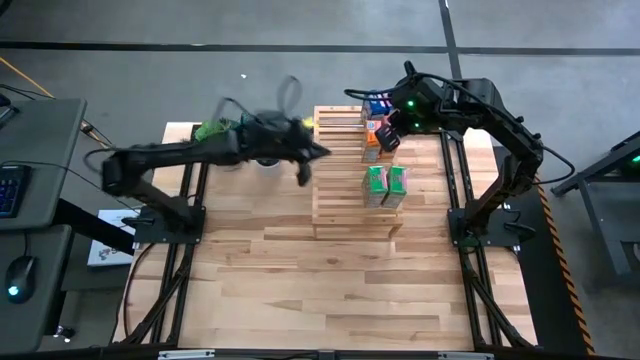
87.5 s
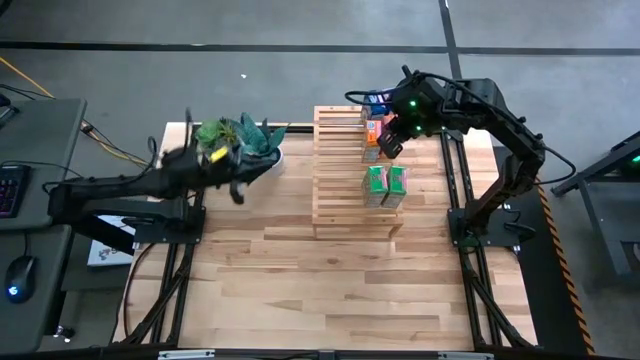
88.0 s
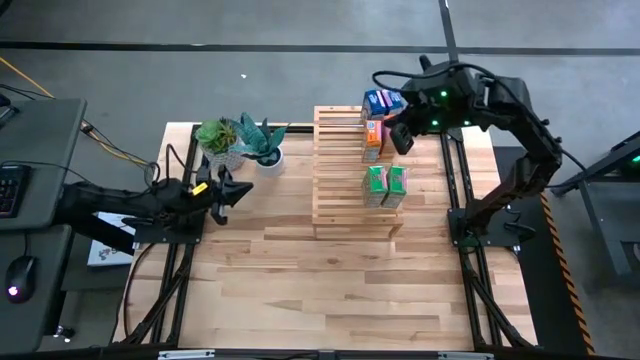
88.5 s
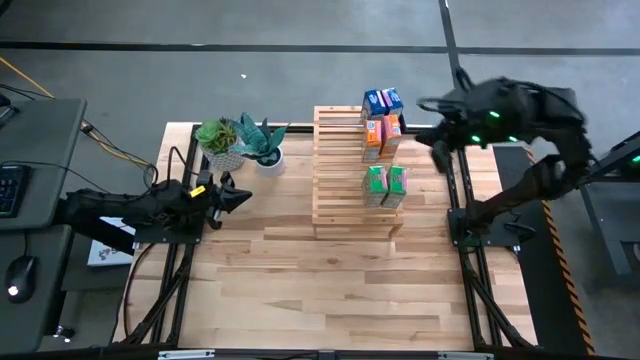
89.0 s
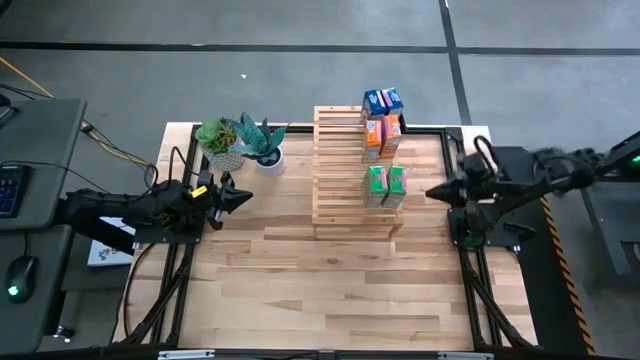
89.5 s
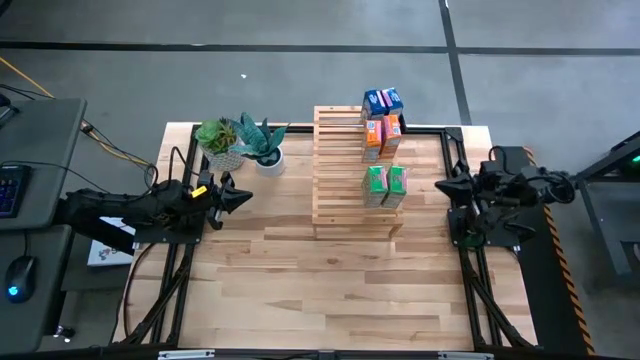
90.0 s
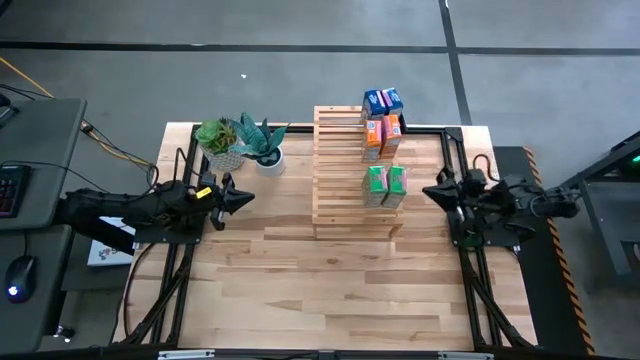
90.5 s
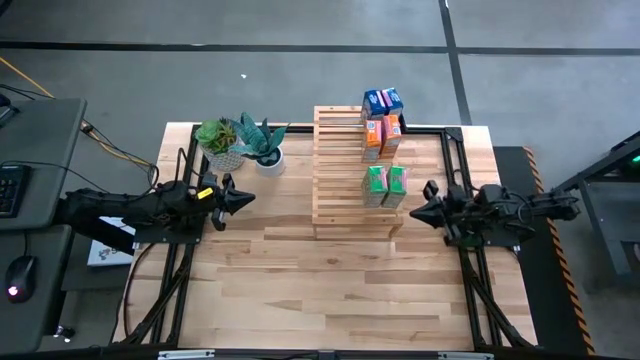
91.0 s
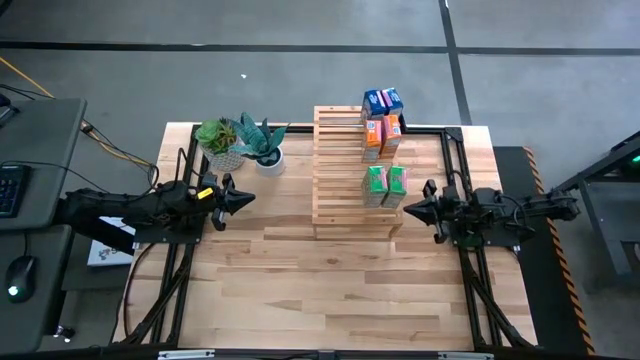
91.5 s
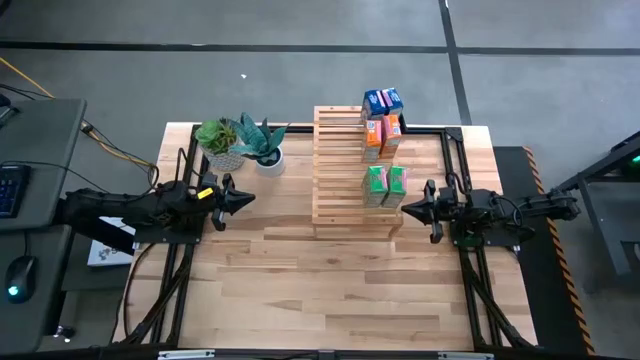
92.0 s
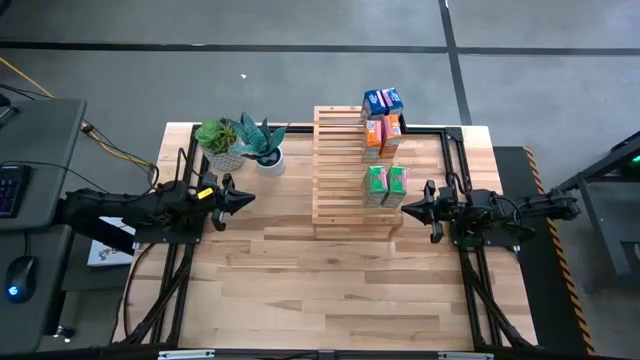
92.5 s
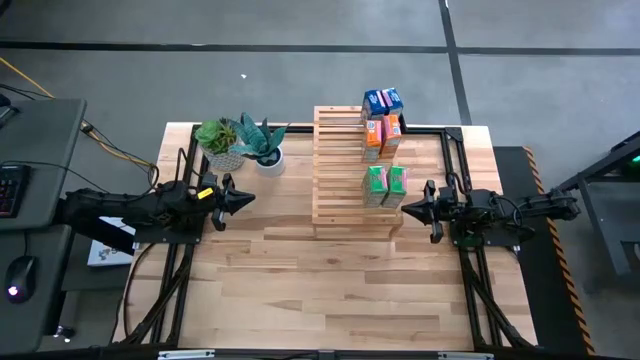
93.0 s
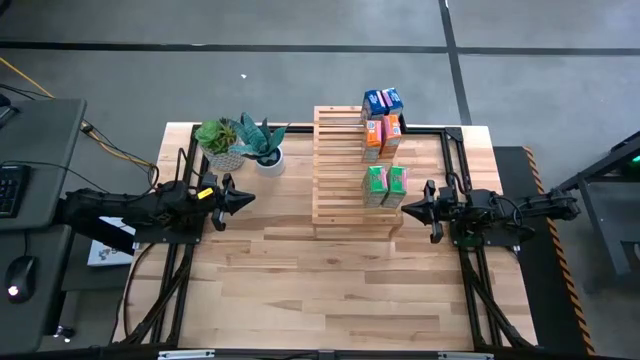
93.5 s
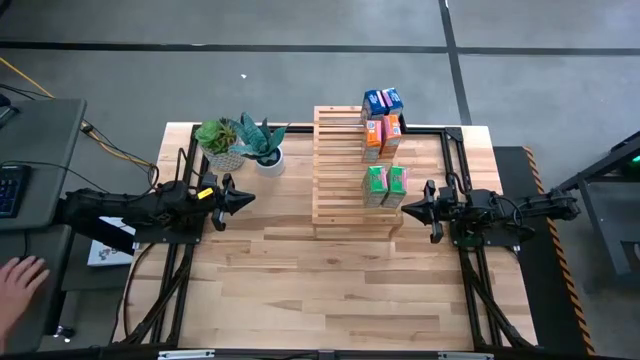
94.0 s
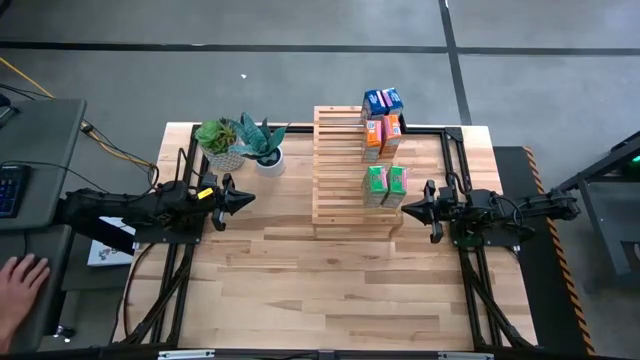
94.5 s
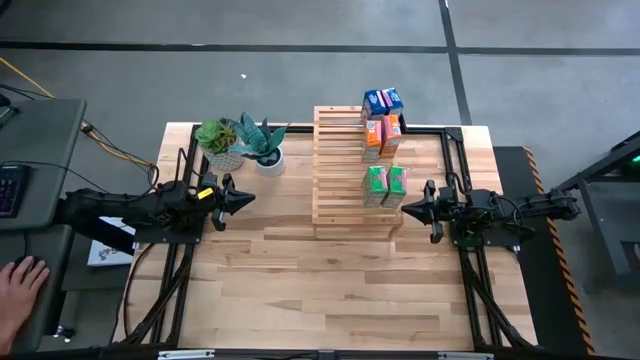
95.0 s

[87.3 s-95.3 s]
Task: Stack cereal on shelf
Return to Home Position

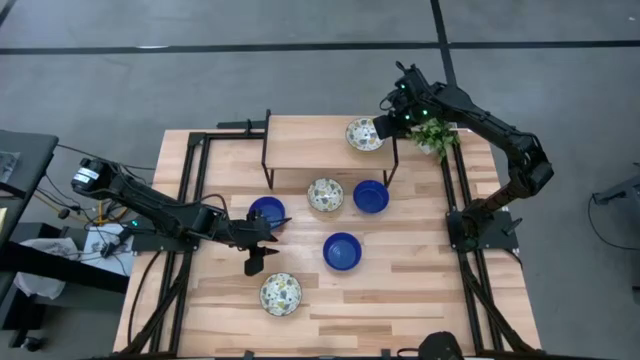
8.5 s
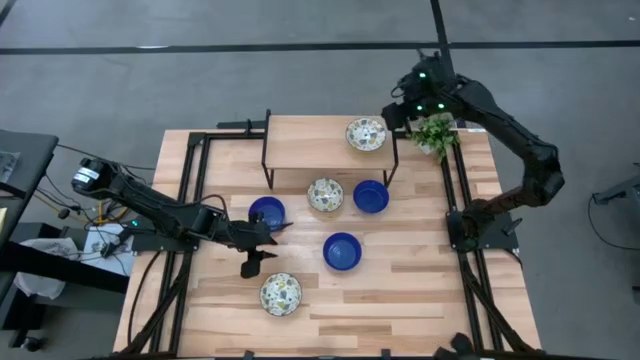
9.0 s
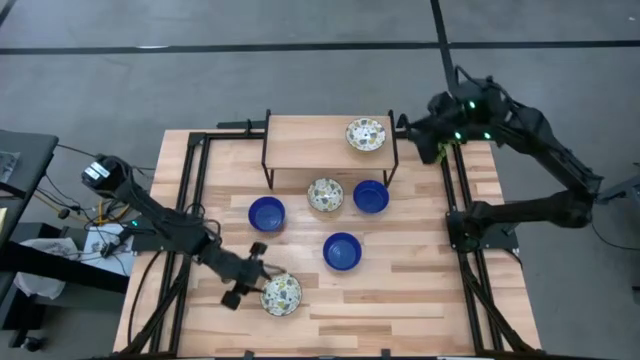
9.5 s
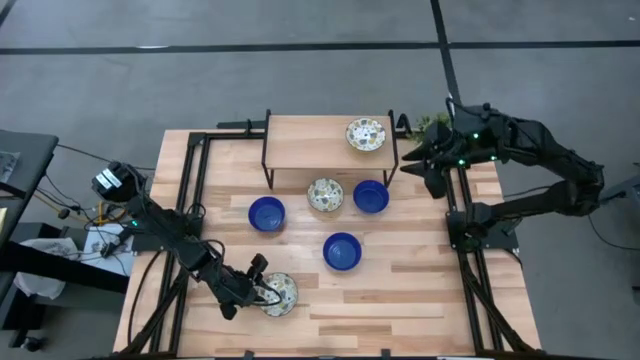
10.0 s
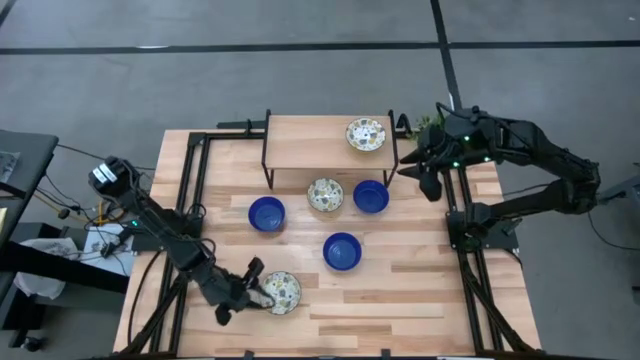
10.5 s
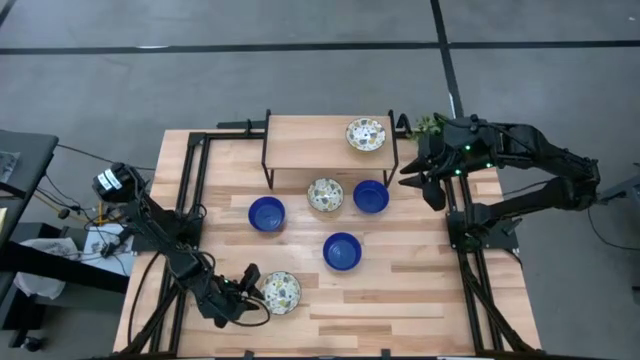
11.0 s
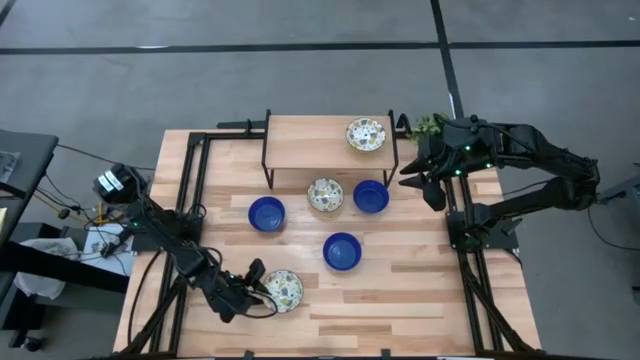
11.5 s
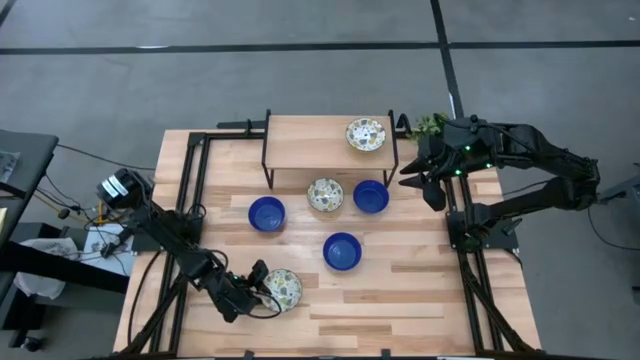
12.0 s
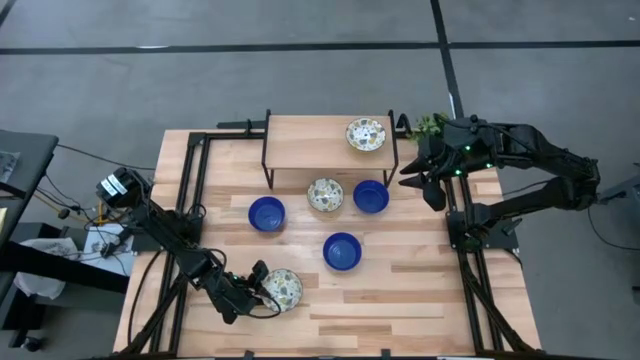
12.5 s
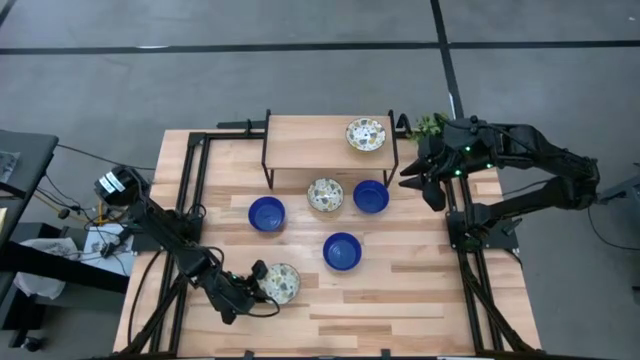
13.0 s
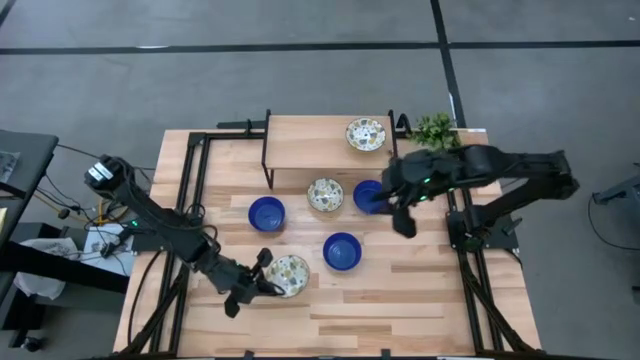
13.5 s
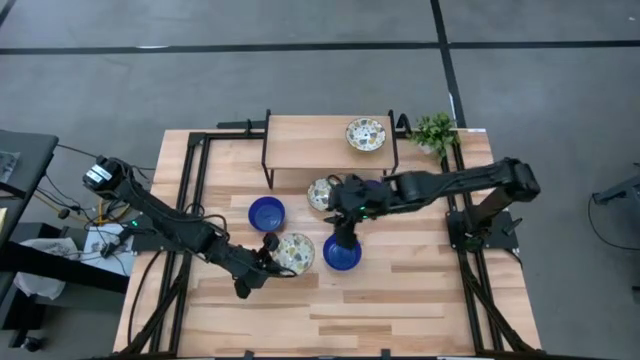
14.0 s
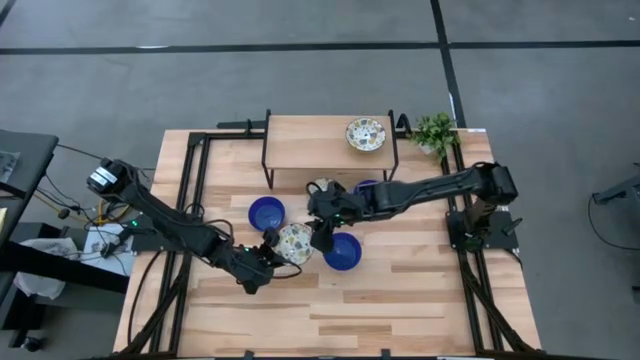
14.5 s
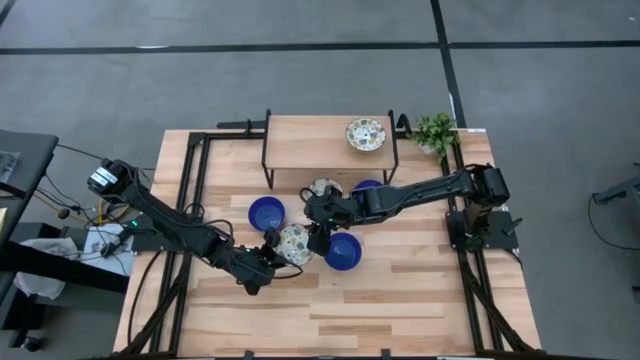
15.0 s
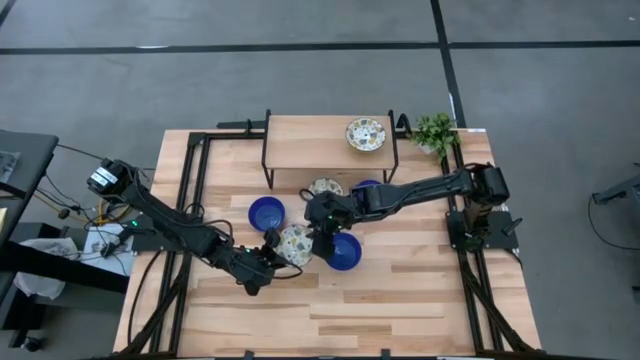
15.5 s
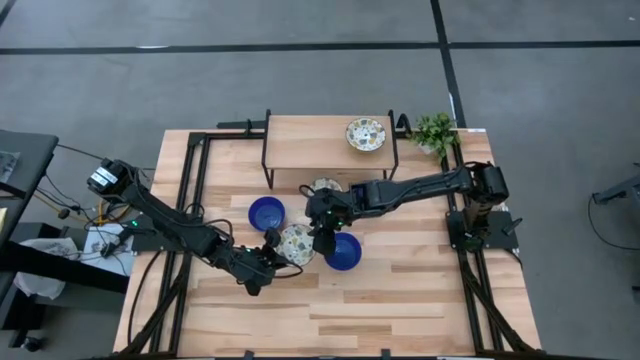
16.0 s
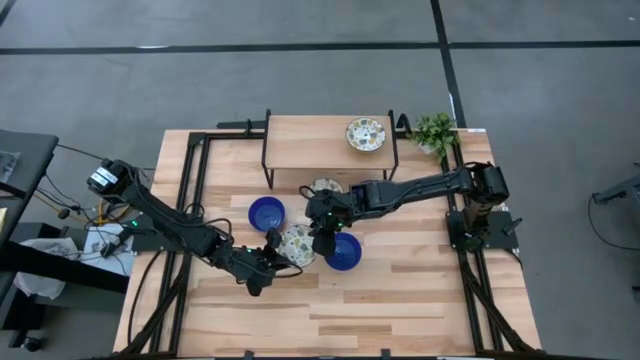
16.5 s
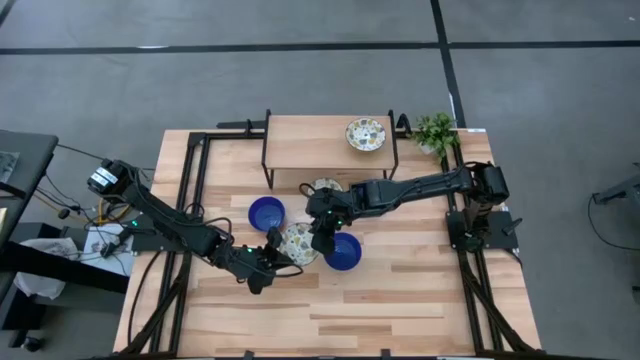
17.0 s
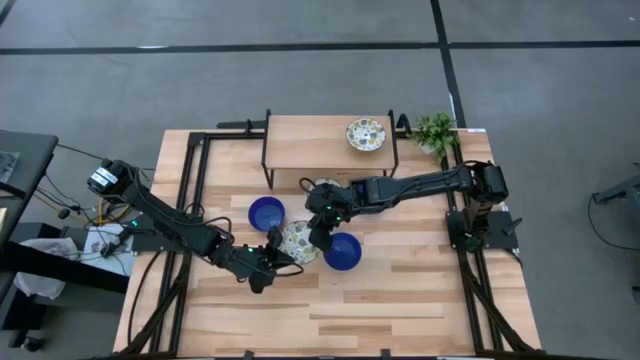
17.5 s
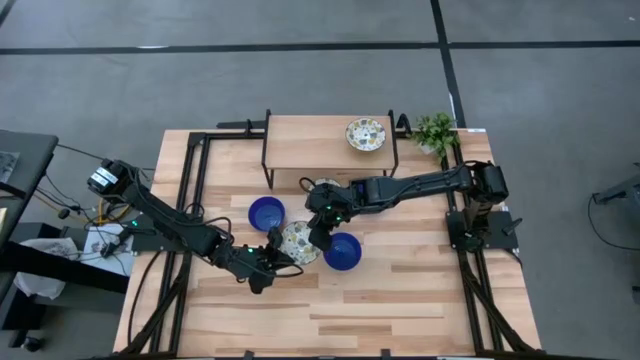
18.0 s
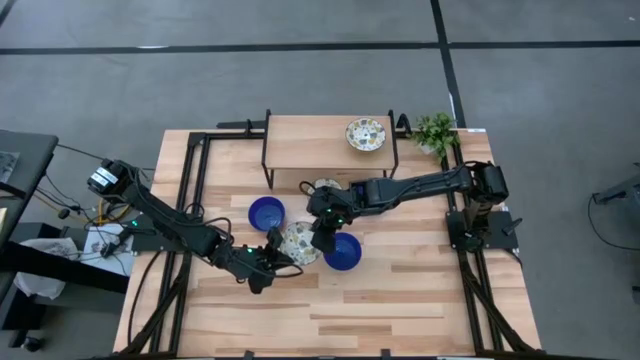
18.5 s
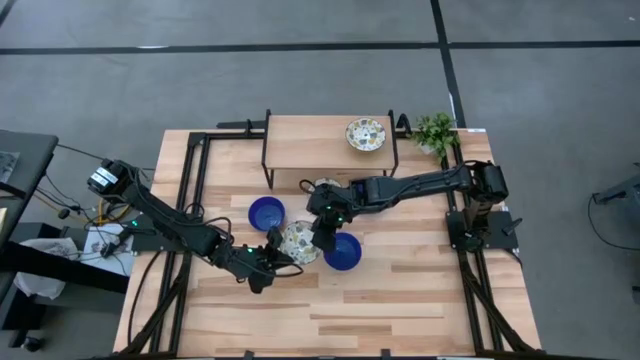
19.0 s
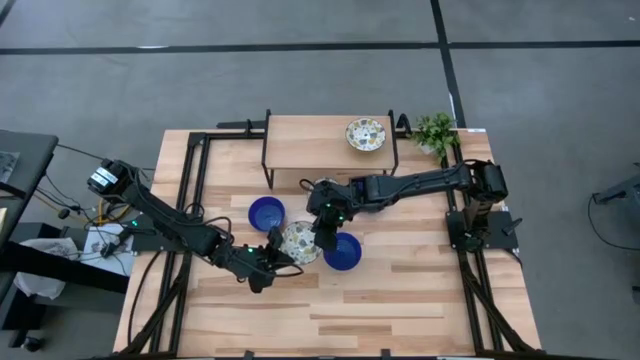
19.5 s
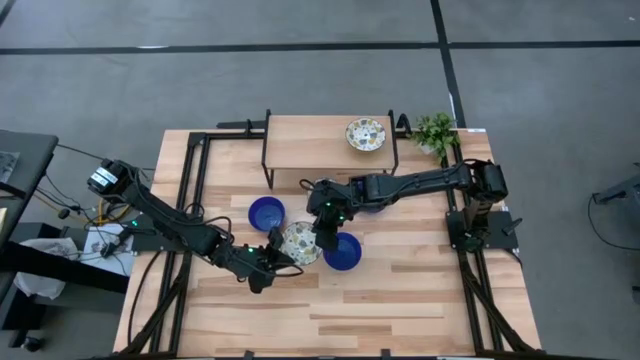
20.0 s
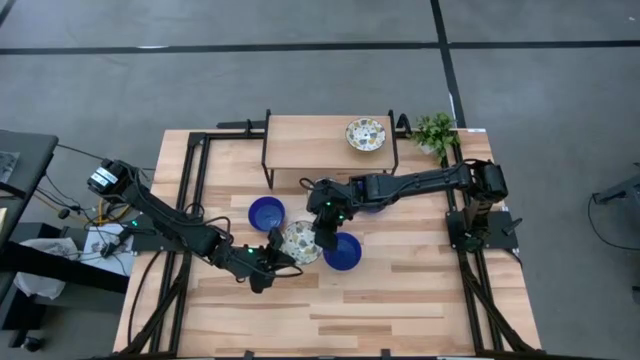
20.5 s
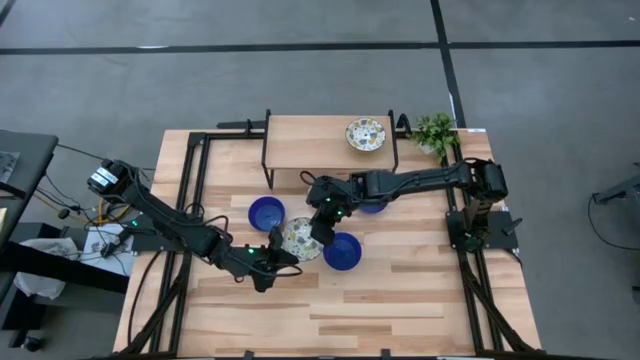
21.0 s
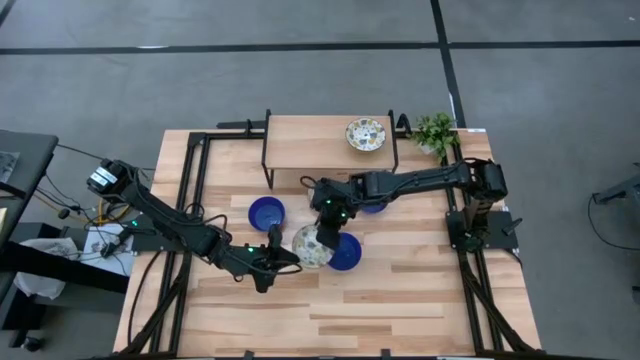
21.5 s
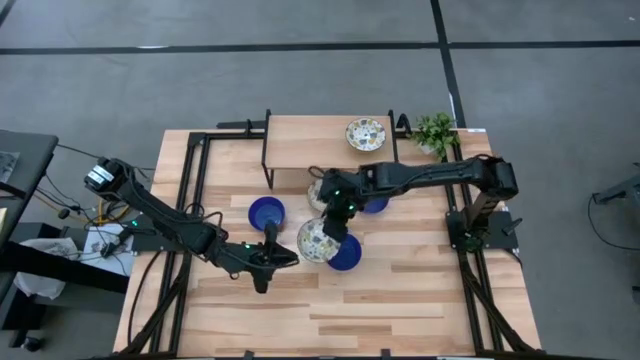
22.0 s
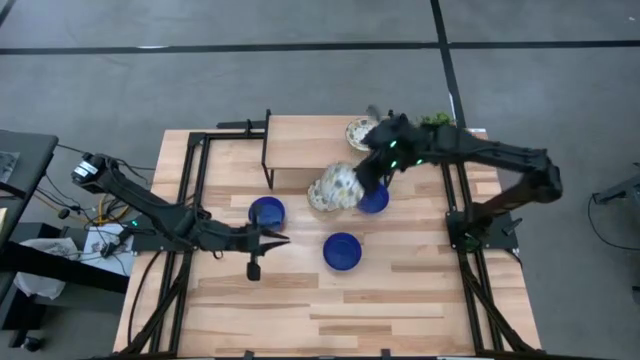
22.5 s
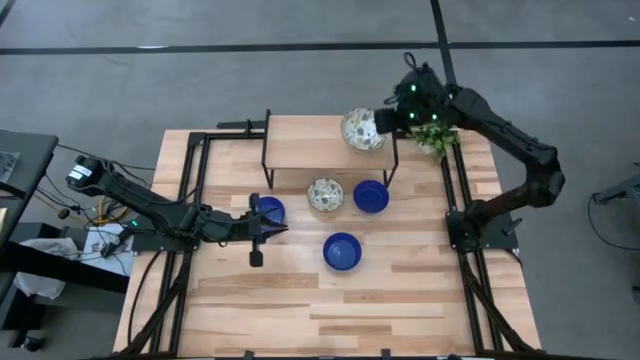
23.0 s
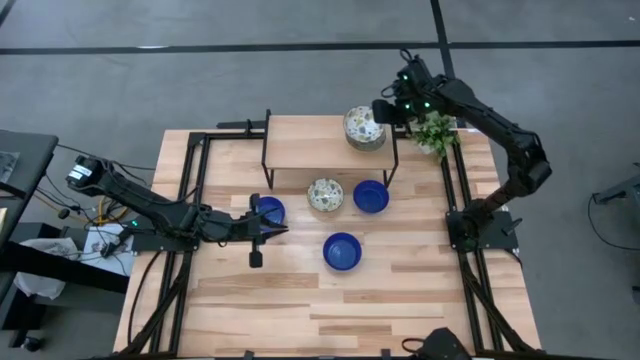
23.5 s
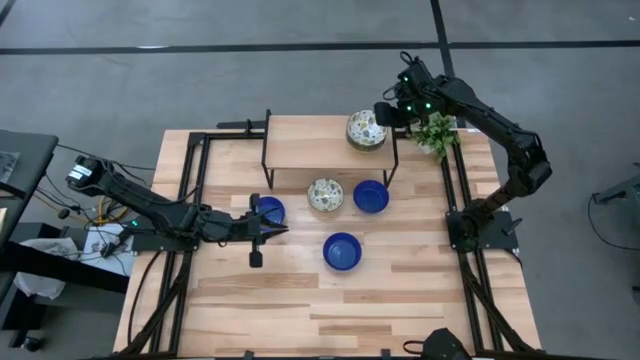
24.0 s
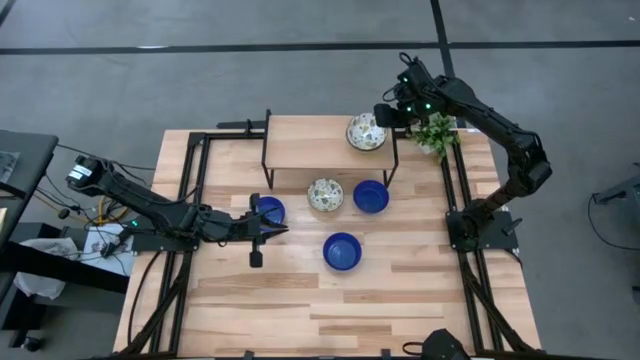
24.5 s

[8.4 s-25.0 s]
Task: Pick & Place Mini bowls
Stack the bottom yellow patterned bowl on top of the yellow patterned bowl on the shelf
